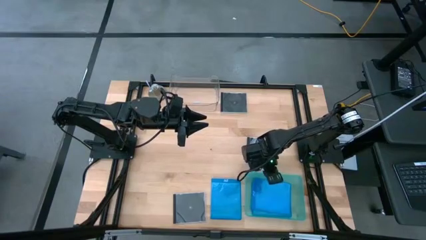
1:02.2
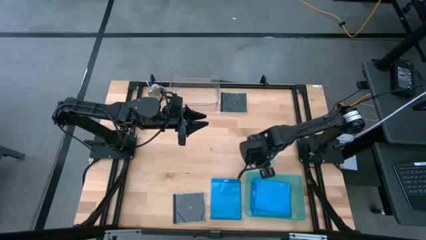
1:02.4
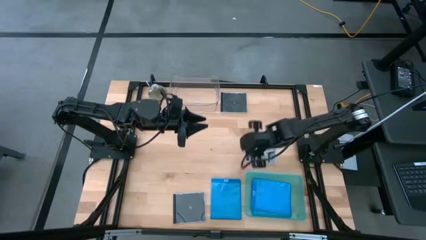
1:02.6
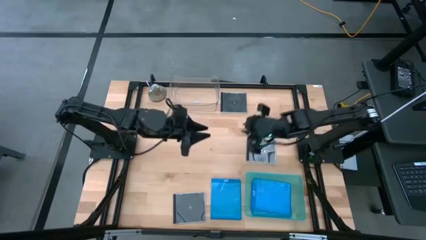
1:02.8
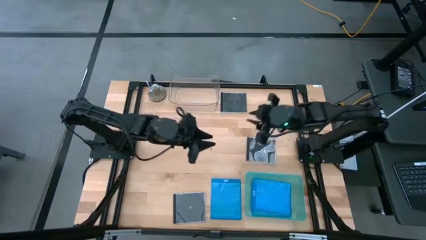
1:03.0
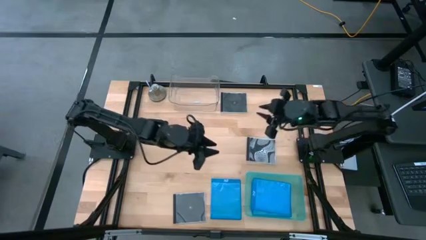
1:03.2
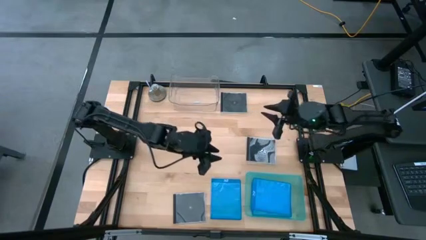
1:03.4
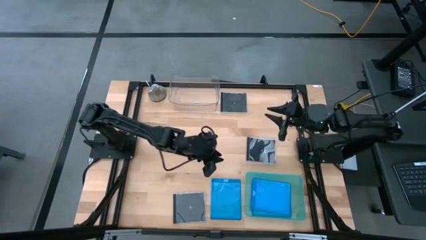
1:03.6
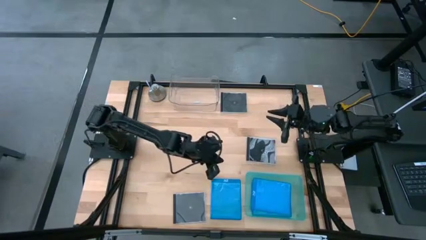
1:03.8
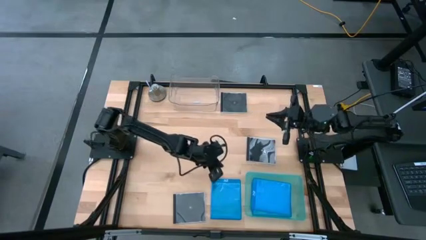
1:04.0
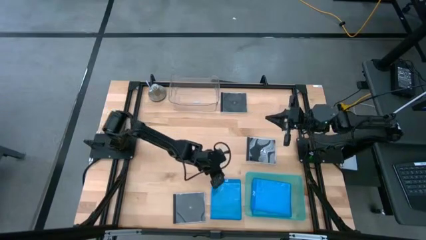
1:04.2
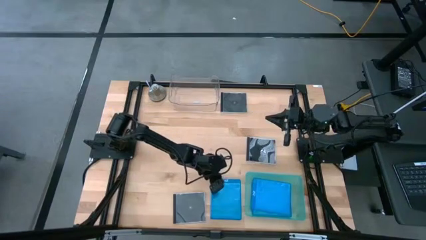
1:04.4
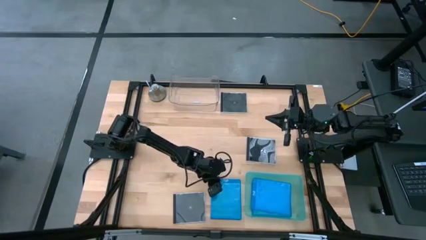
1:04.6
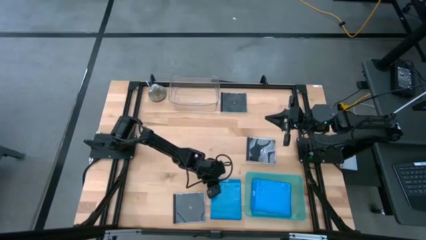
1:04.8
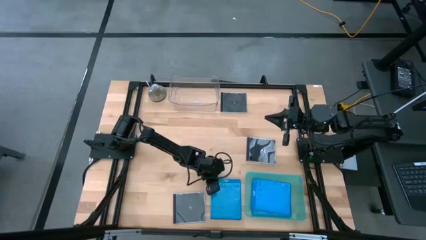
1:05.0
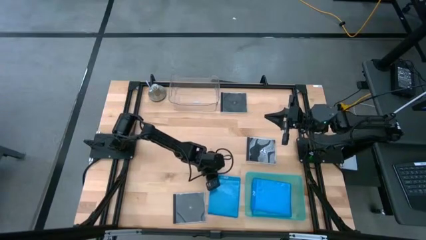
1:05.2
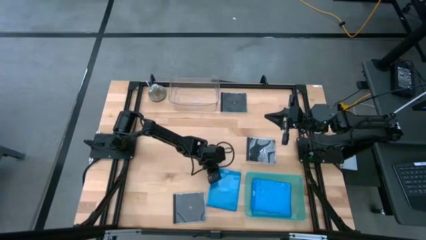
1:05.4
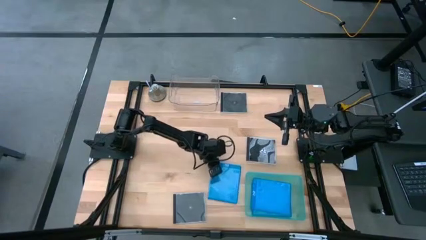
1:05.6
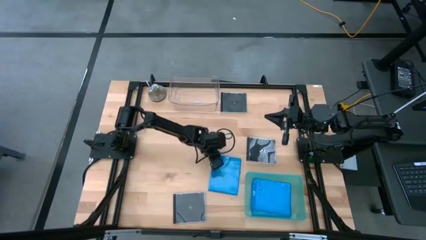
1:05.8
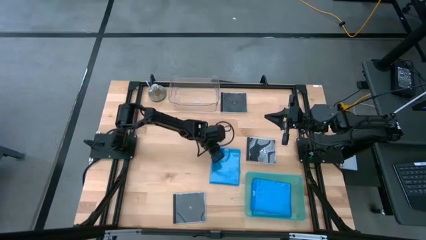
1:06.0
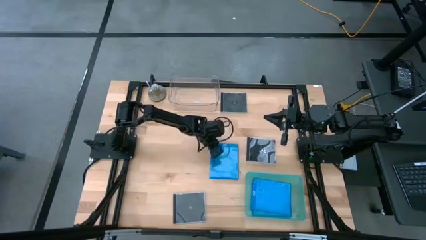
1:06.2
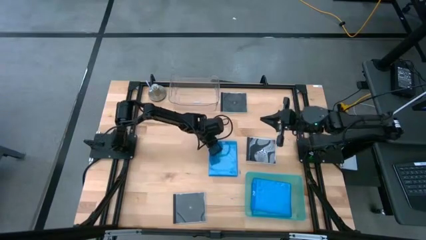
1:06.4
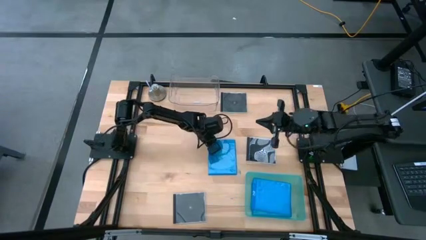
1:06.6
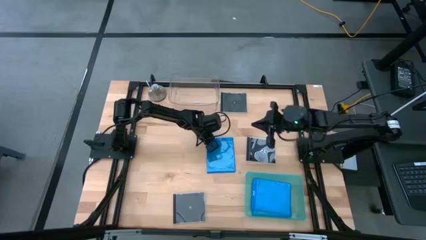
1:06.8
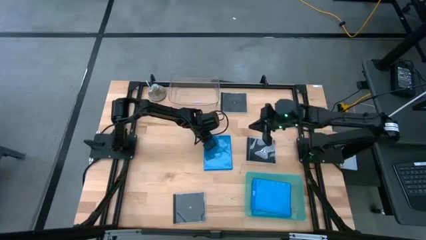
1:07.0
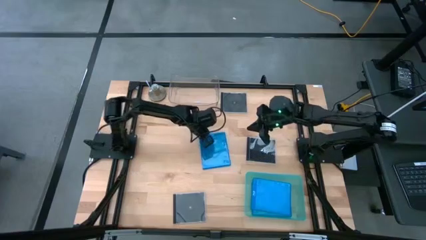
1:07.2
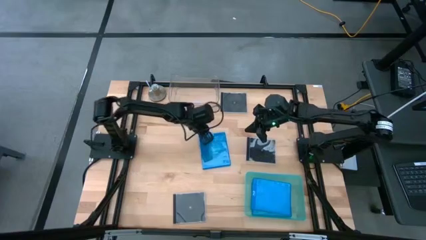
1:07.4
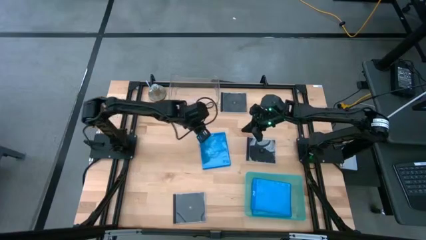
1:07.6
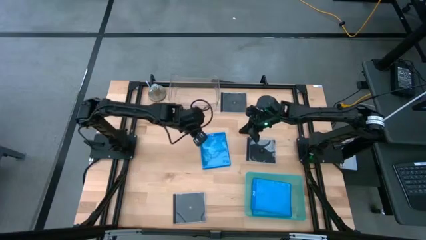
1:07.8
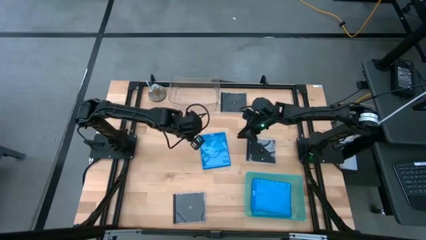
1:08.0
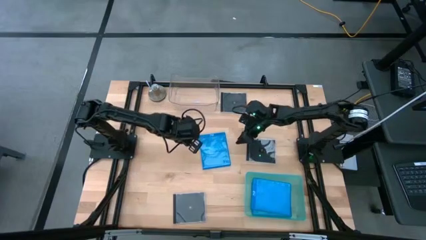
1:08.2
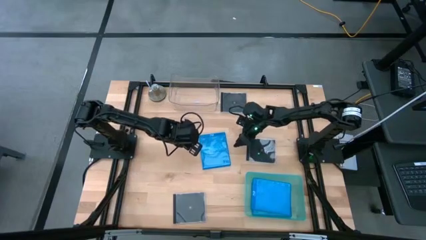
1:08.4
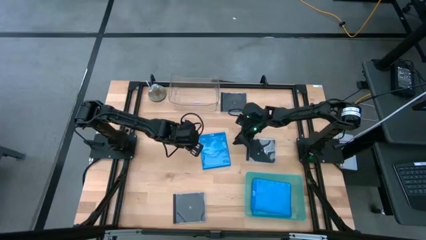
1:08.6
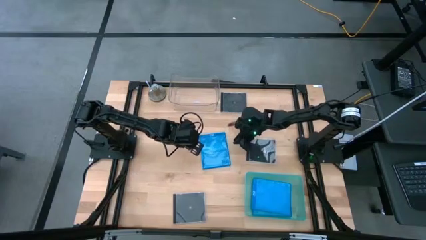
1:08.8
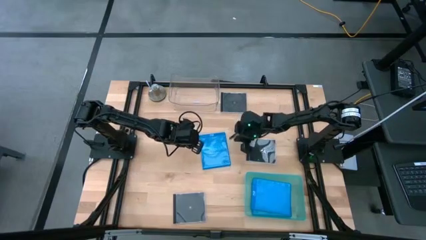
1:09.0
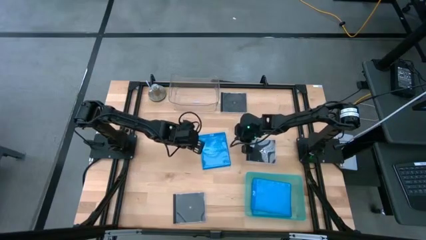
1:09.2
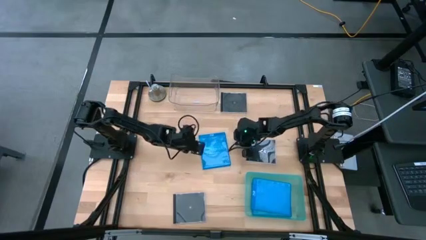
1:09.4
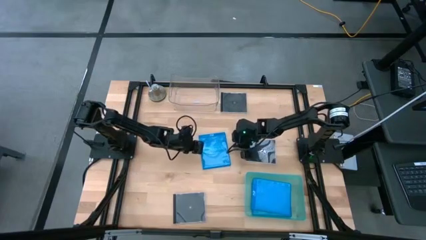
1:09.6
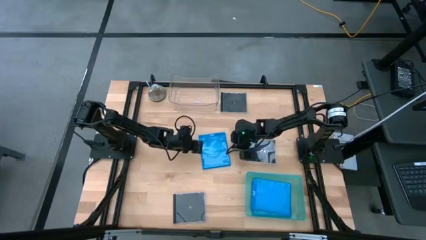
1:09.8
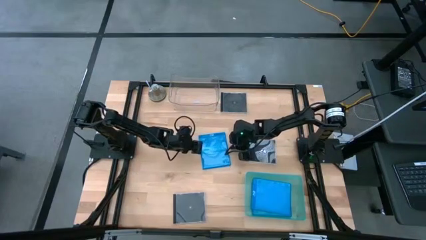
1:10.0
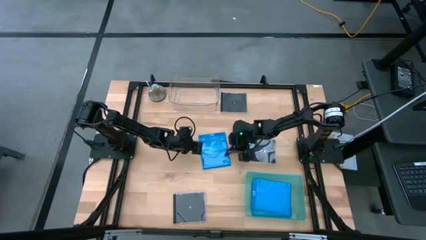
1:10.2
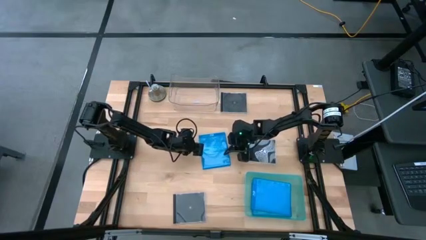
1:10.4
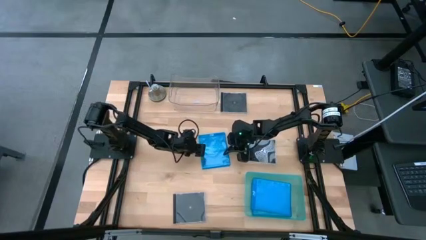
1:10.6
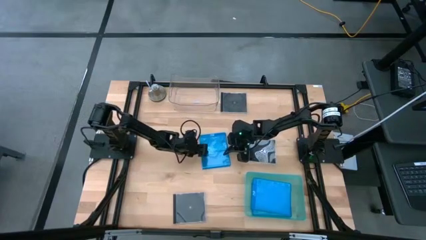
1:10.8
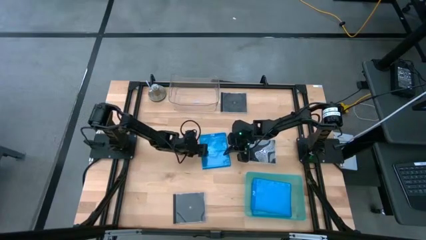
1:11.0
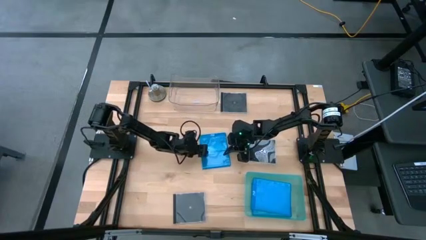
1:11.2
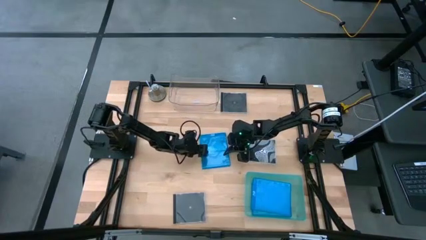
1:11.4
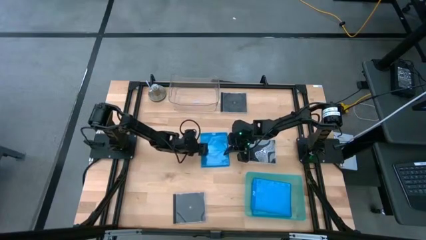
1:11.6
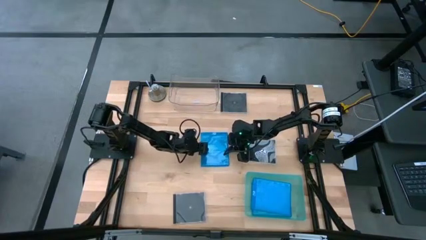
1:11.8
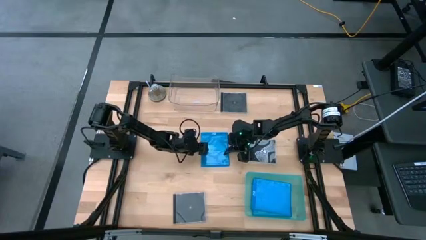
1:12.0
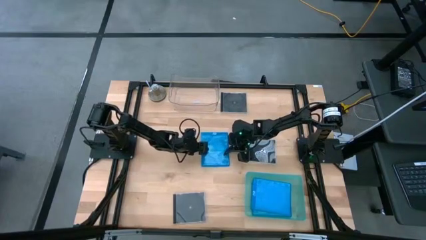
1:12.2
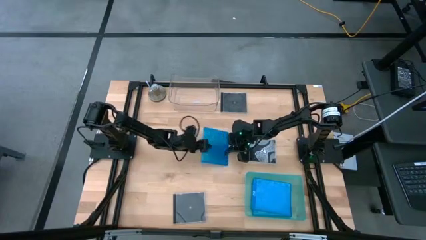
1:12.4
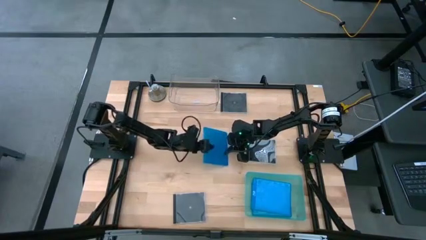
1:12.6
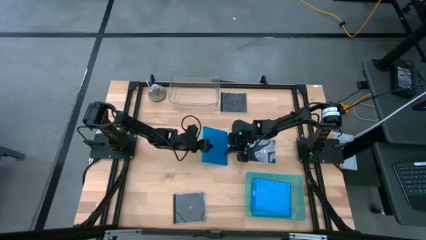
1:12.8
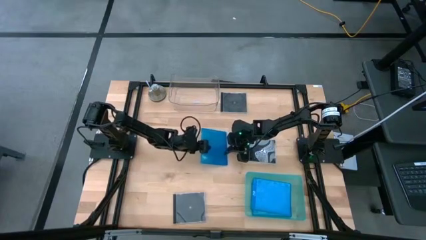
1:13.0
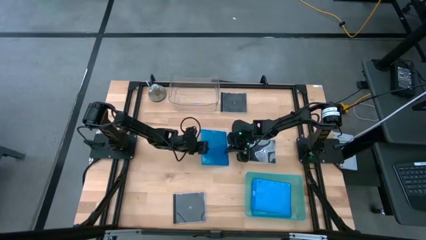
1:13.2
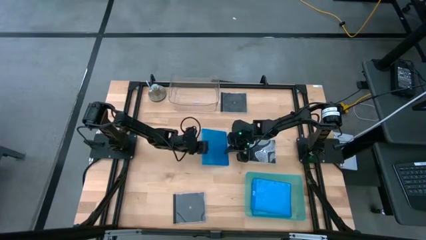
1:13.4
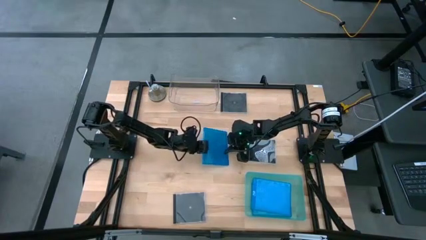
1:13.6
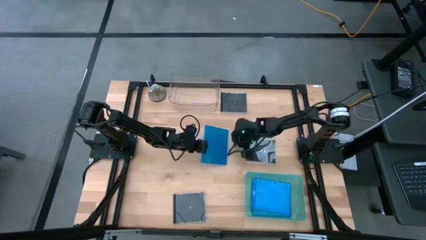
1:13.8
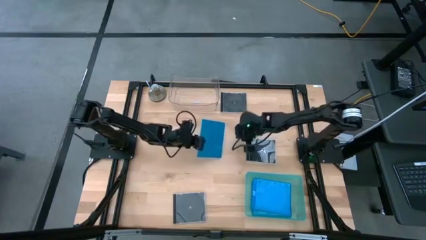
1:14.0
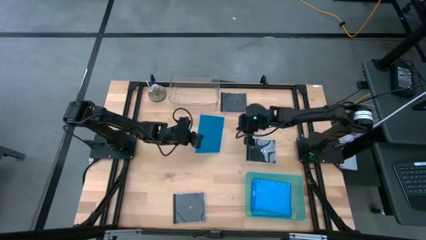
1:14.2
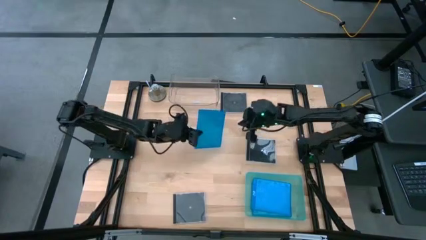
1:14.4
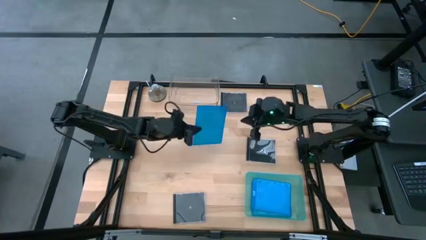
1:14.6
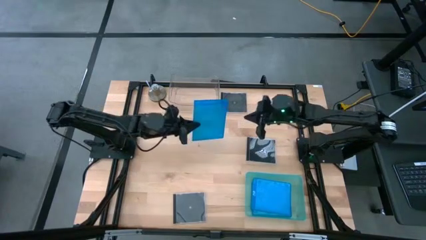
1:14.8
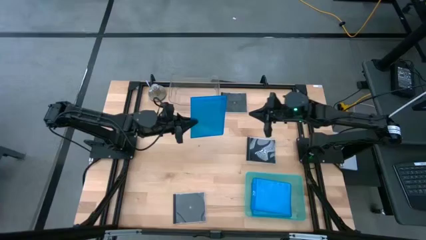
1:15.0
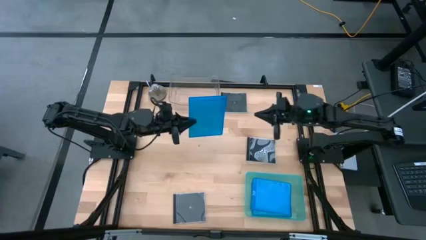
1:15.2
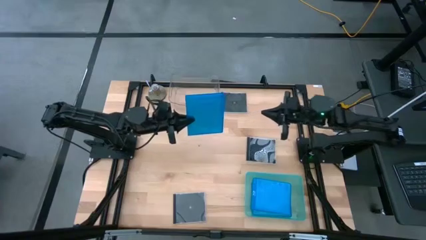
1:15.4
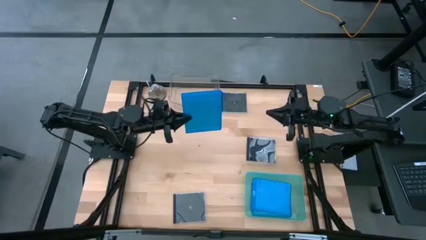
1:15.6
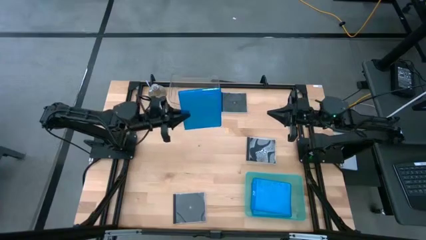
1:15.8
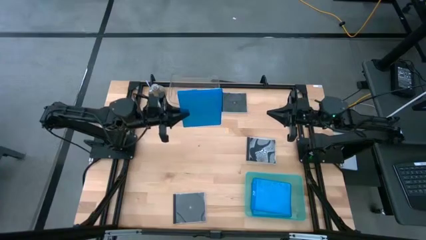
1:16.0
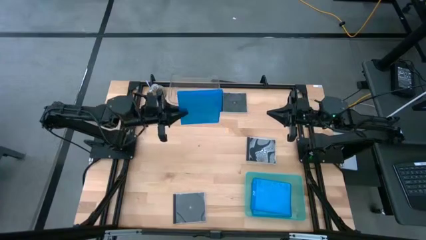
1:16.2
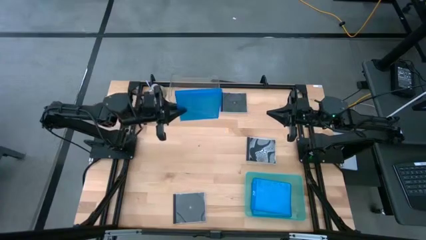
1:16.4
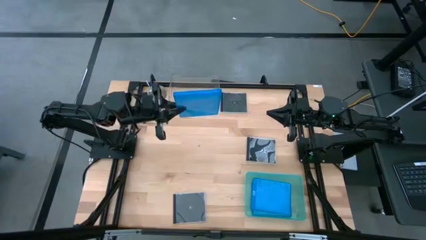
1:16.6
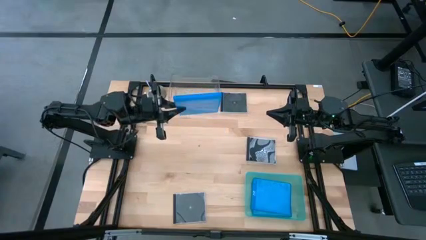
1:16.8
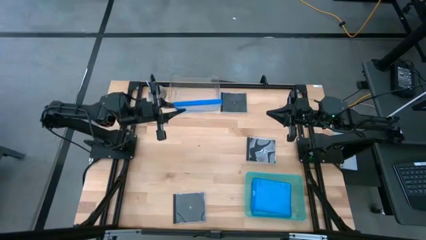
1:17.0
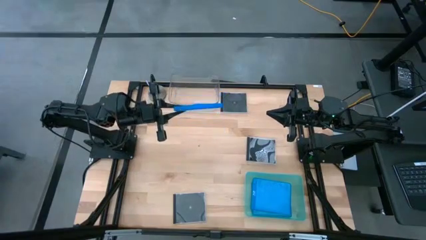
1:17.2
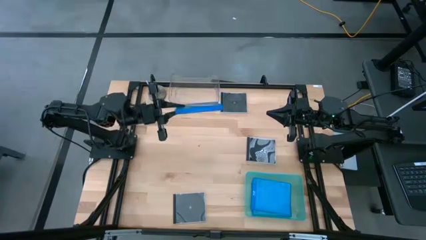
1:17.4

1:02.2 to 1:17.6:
Task: Pick & place jewel cases by type
Put the blue cd case into the green bin

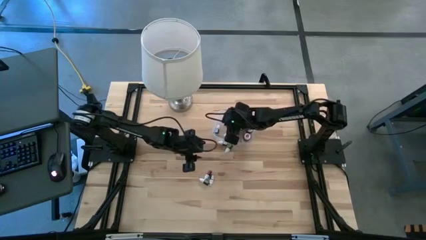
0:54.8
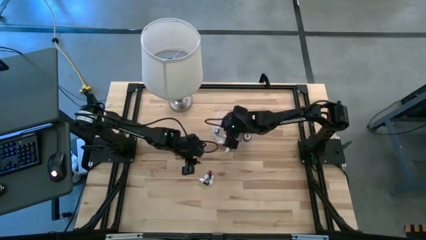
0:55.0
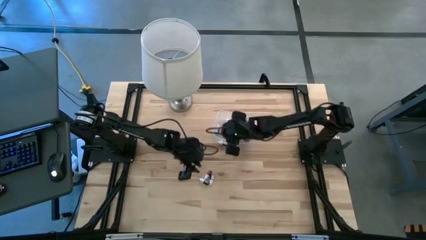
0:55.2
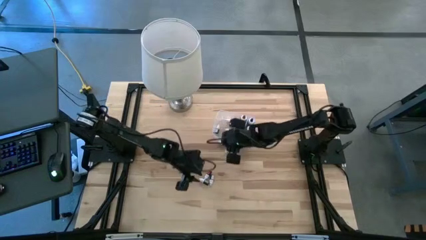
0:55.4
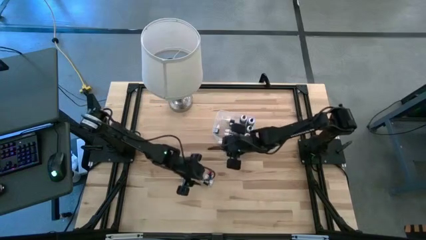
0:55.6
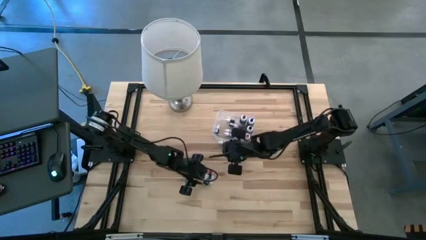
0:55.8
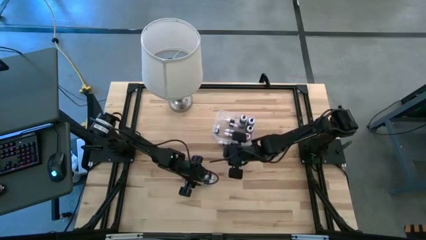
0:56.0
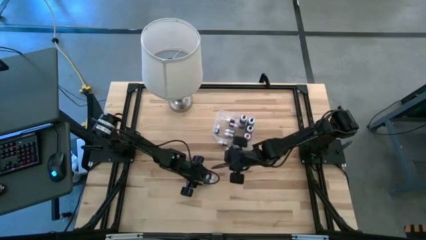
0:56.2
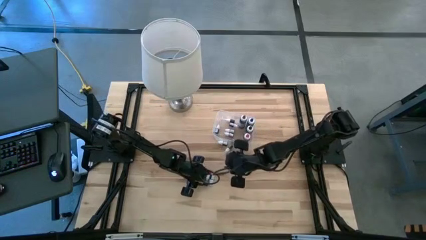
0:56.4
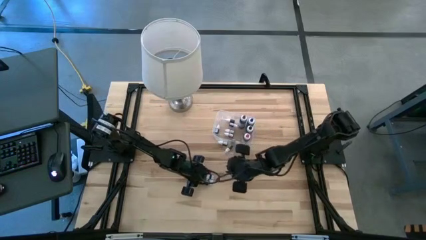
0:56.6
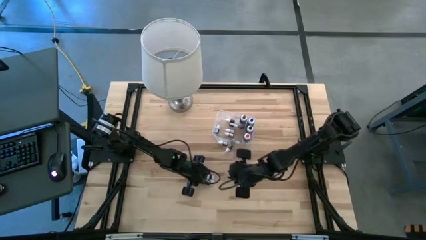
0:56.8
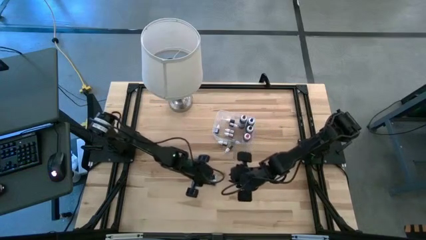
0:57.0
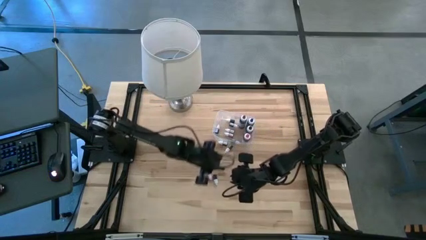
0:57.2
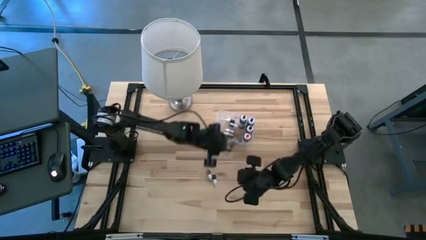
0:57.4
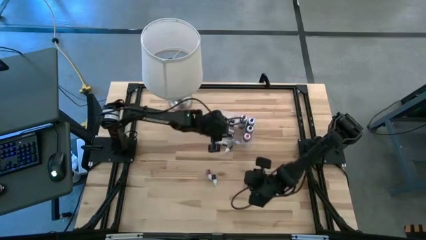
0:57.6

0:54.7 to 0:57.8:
Task: Pick & Place food coloring
Put the bottom small green food coloring bottle into the transparent bin
